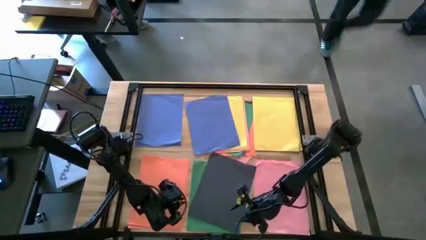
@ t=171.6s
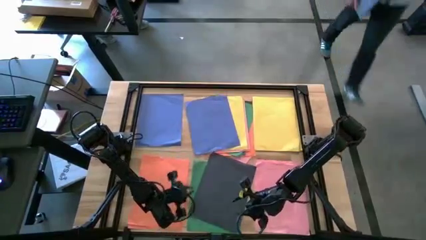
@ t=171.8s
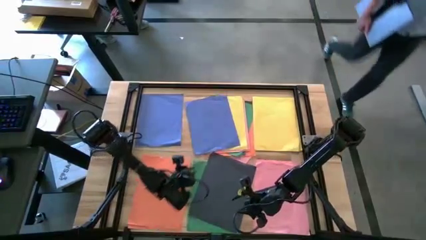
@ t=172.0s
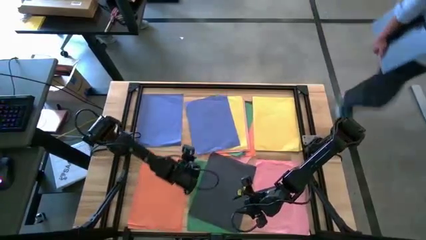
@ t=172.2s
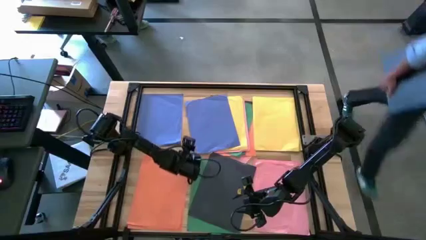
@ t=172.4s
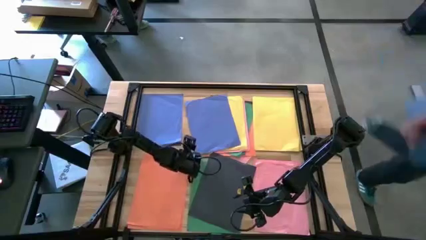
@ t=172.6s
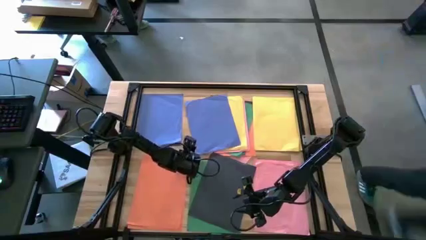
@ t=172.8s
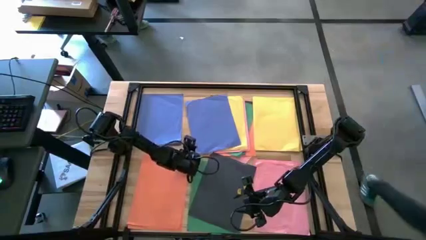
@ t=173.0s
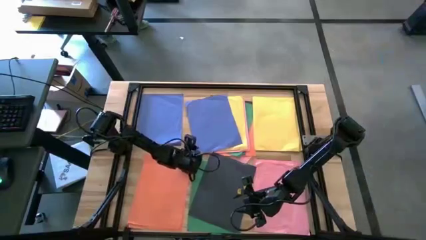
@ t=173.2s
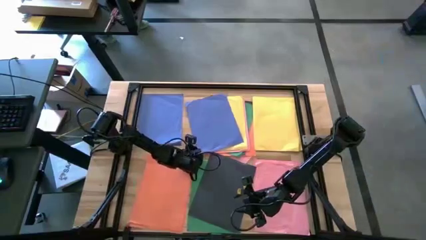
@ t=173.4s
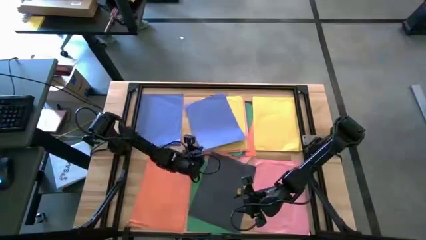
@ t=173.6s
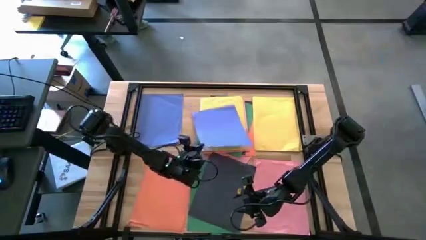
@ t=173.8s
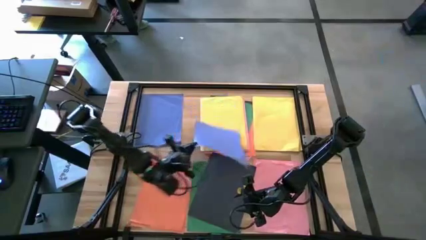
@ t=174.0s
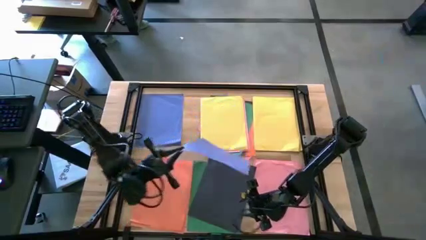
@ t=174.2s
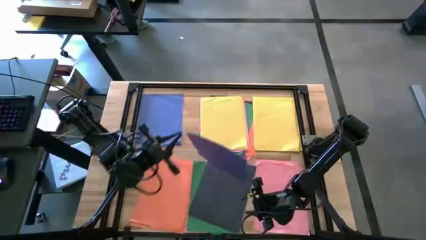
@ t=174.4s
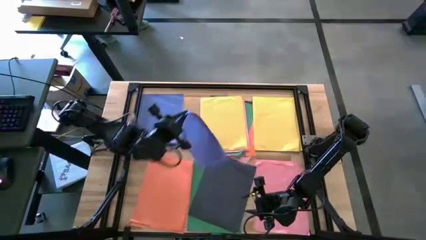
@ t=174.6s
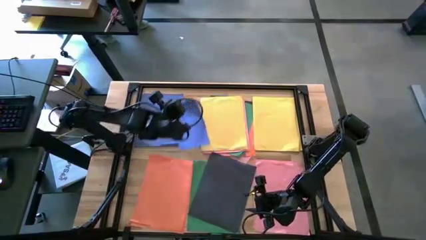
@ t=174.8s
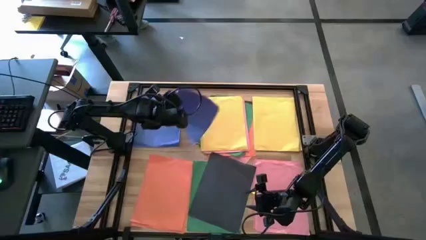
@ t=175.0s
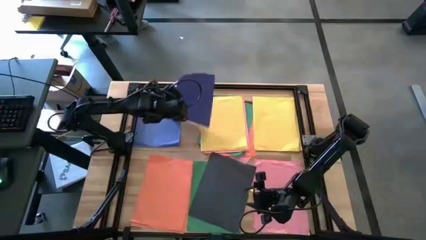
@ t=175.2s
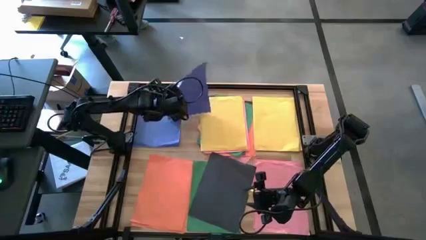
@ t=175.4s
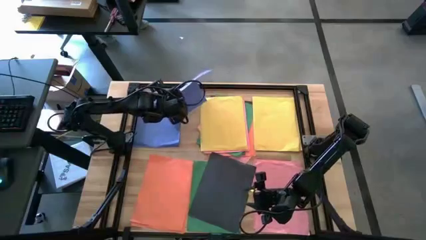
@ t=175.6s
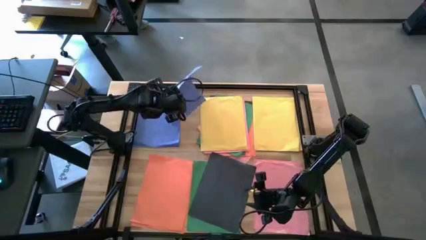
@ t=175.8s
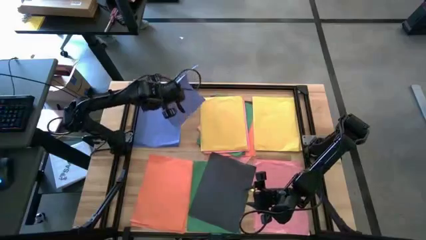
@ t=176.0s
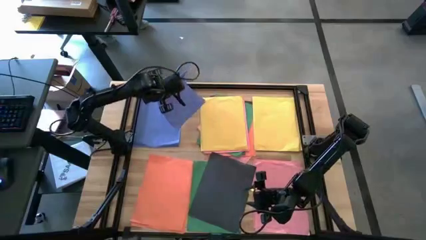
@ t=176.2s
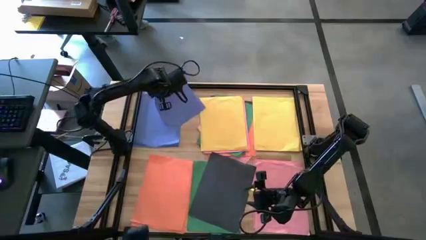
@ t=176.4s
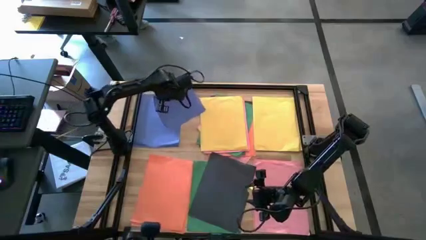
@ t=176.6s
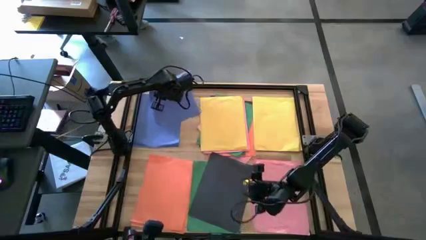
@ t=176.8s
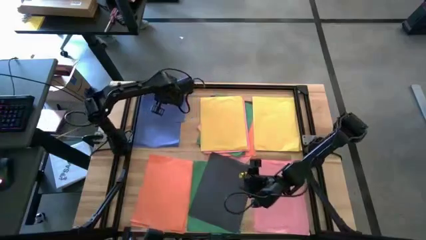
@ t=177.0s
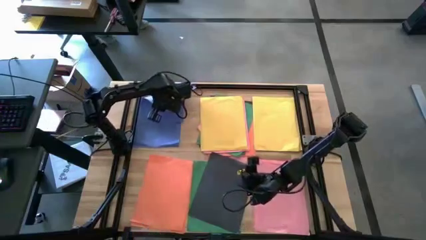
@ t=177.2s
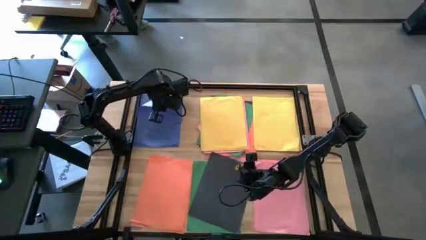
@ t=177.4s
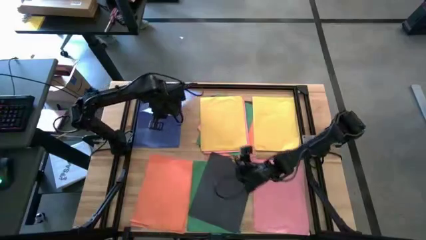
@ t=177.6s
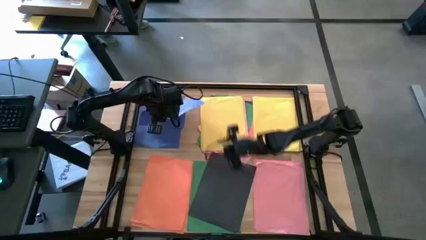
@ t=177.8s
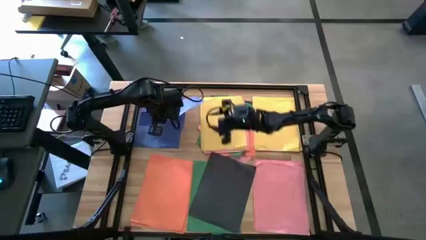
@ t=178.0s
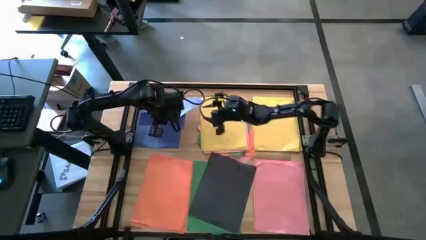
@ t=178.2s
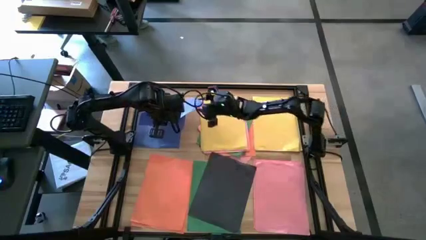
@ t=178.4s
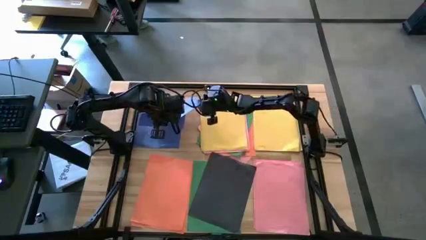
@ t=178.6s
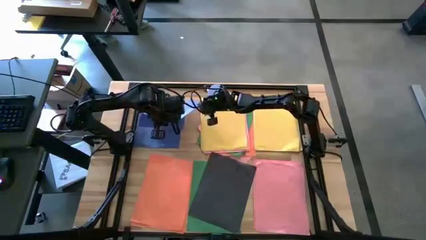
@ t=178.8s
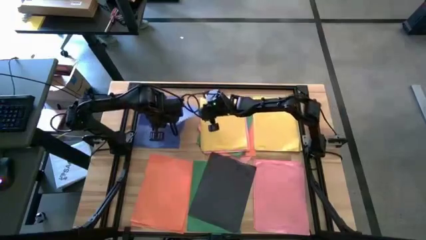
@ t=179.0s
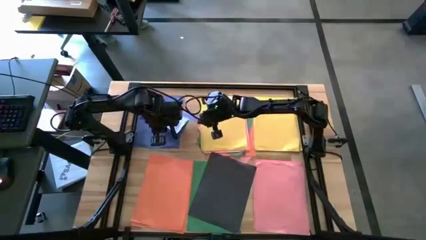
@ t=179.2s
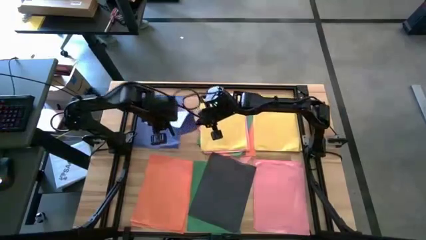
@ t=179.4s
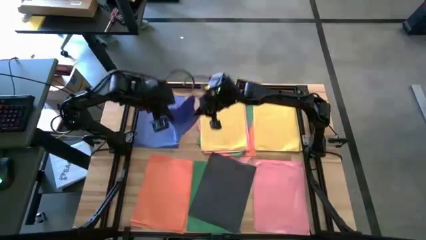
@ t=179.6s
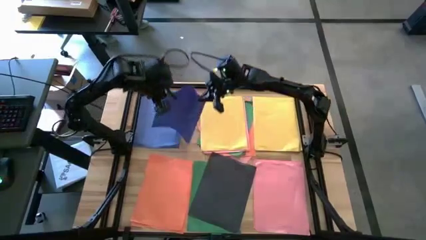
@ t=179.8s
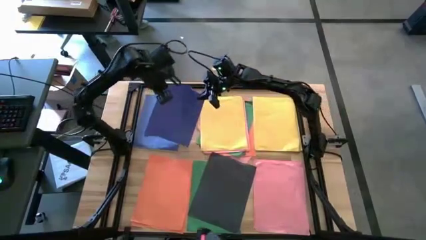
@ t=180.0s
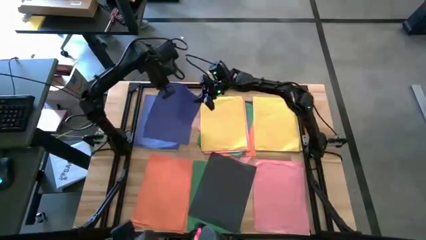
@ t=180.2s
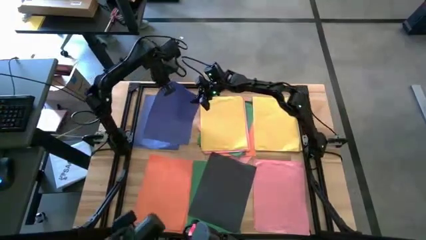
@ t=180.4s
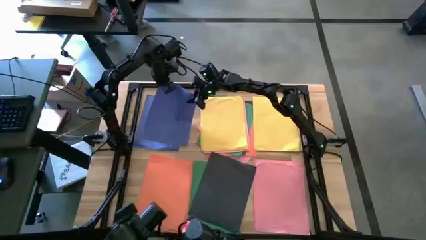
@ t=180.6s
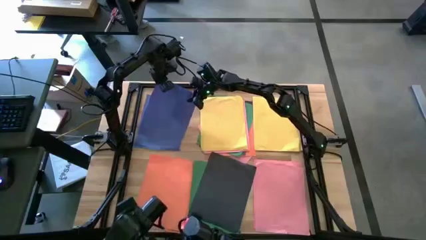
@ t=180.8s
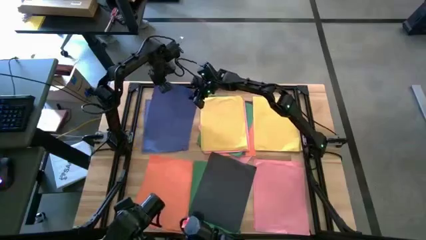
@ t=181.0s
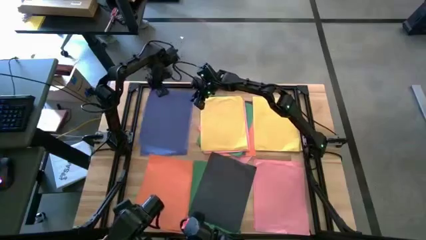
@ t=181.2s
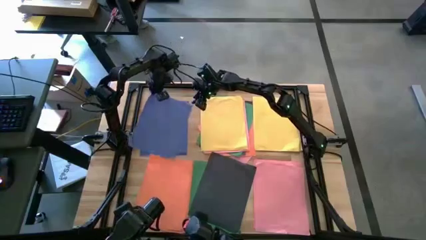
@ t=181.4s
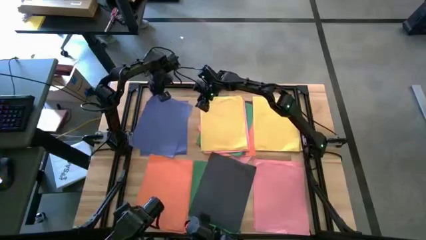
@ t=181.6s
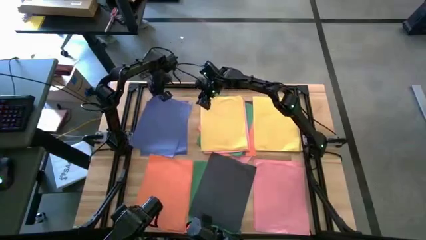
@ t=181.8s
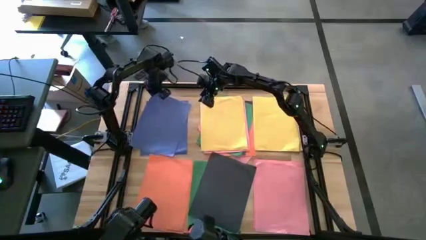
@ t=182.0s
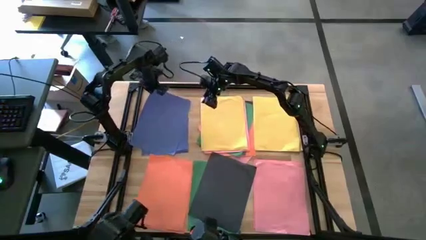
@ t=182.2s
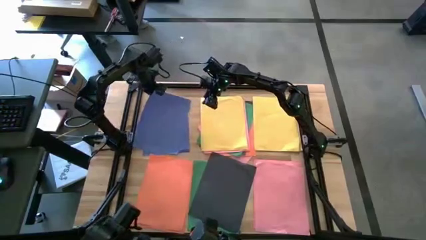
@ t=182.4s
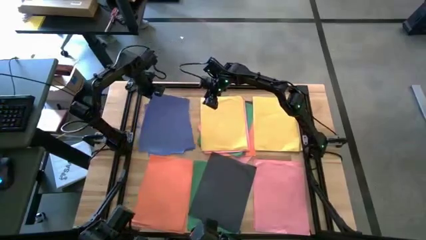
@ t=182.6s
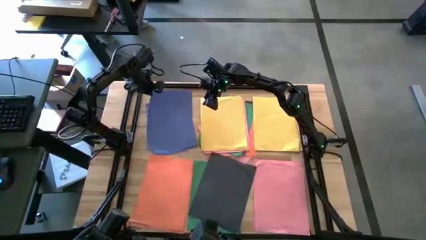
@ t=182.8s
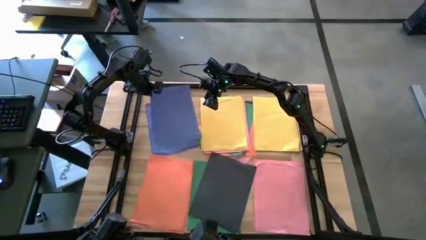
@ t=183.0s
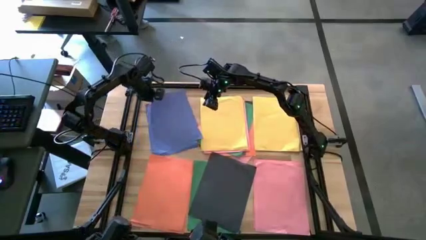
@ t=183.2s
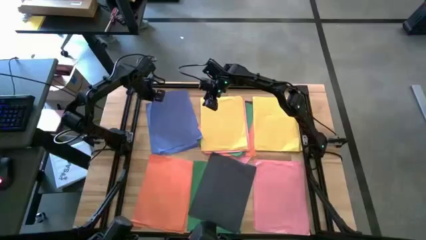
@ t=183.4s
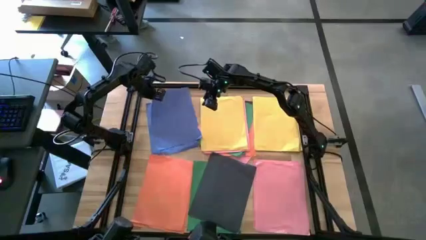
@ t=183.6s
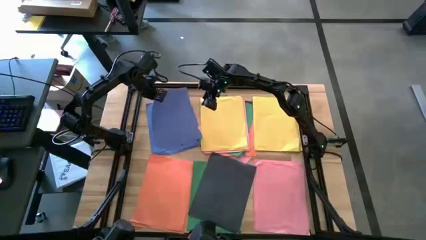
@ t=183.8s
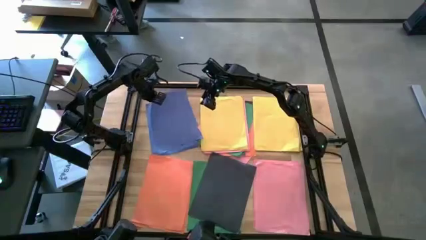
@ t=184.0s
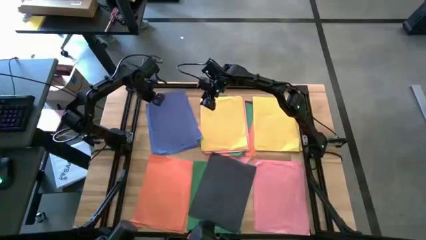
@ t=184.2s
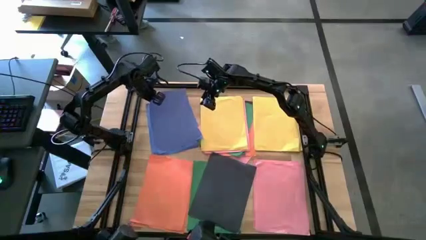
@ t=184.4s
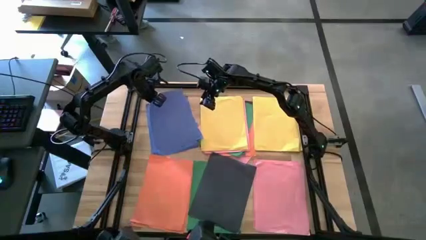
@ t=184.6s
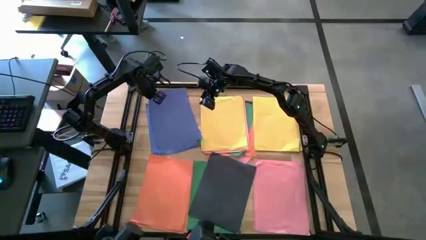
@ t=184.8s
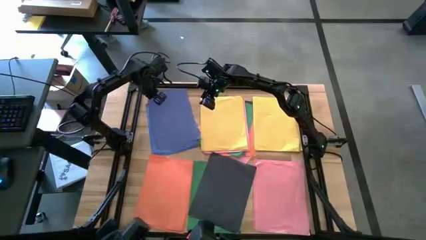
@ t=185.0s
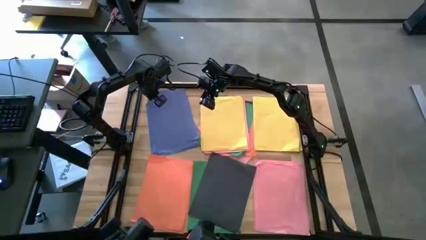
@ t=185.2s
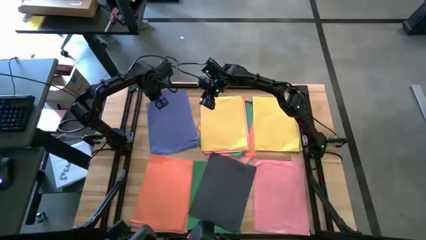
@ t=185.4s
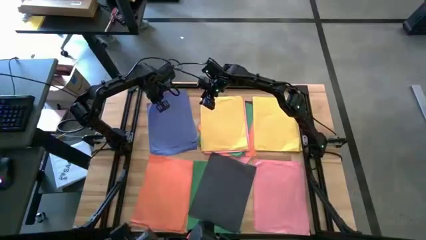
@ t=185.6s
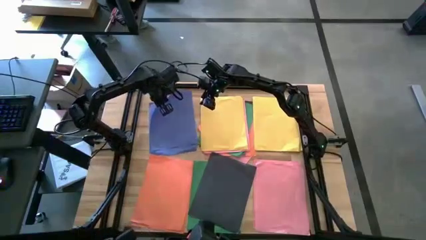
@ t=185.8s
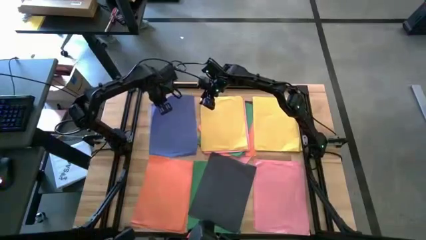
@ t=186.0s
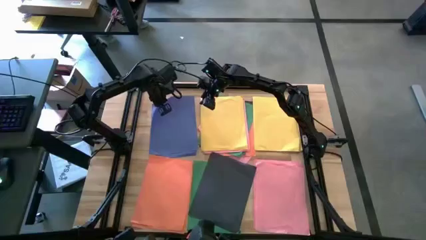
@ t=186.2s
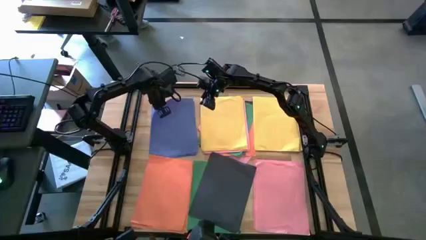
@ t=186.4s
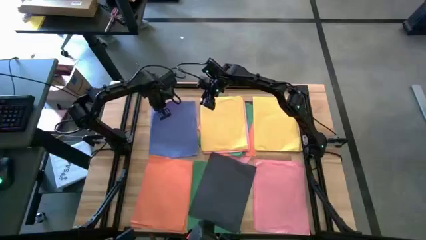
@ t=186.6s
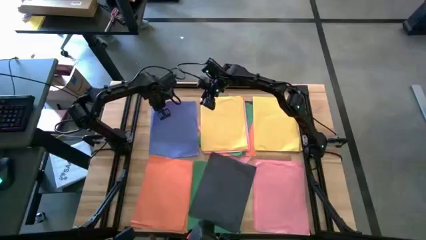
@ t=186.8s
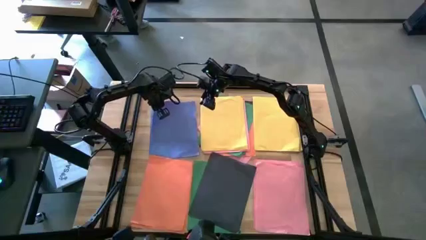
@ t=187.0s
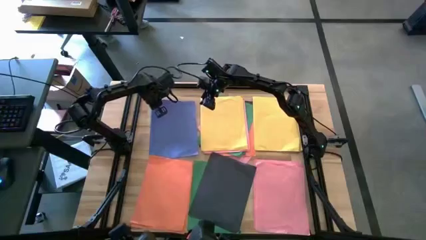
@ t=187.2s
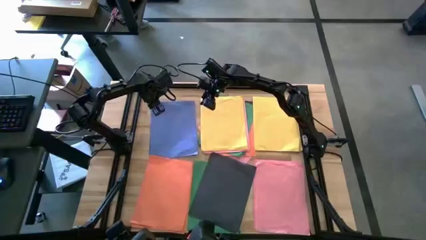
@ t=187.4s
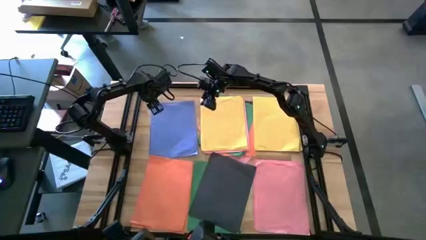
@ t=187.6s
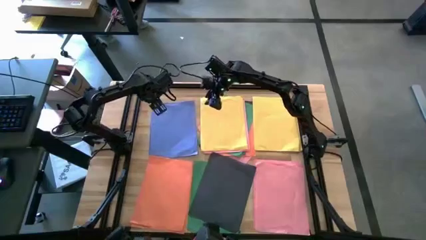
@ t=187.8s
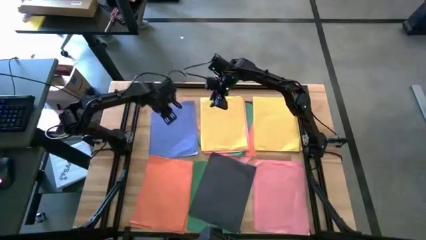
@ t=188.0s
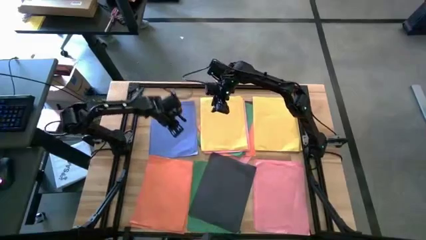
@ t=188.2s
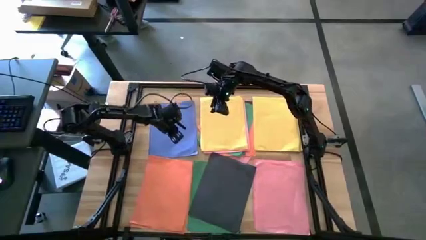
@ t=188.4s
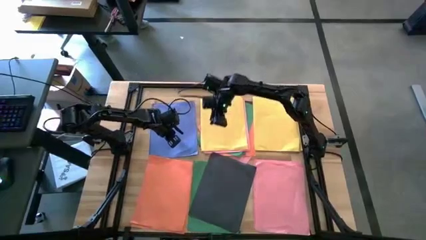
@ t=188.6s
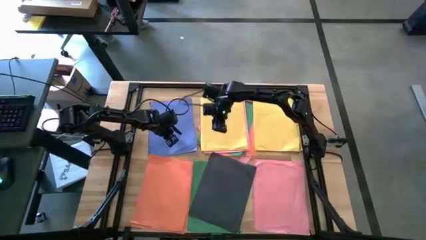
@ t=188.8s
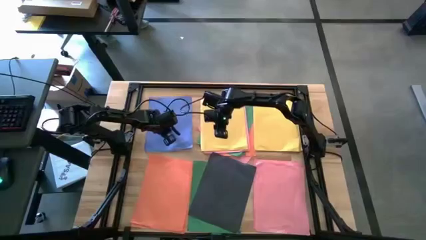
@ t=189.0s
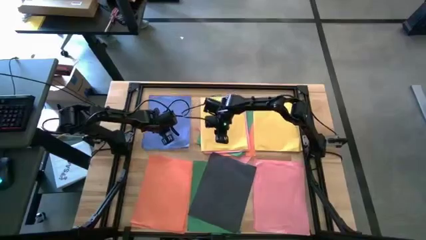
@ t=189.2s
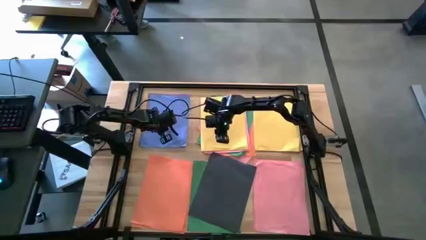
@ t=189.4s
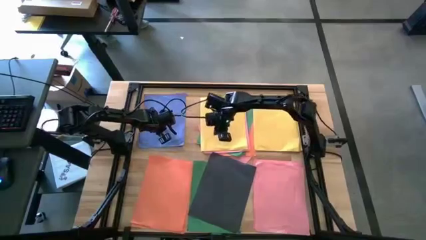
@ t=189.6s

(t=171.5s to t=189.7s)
Task: Organize paper
Stack the right blue paper on the left blue paper
